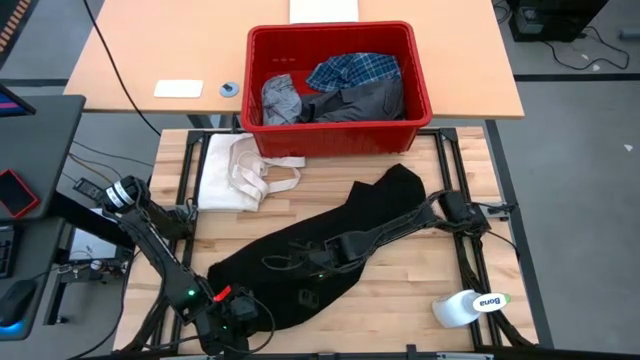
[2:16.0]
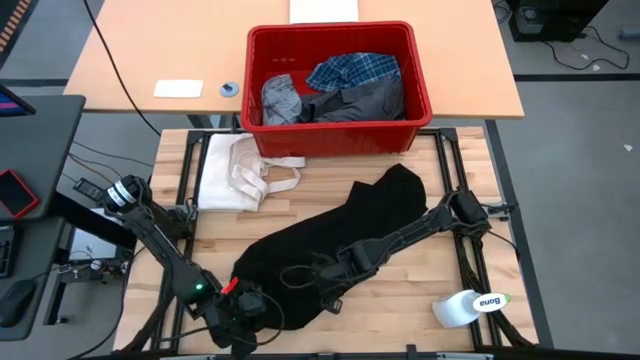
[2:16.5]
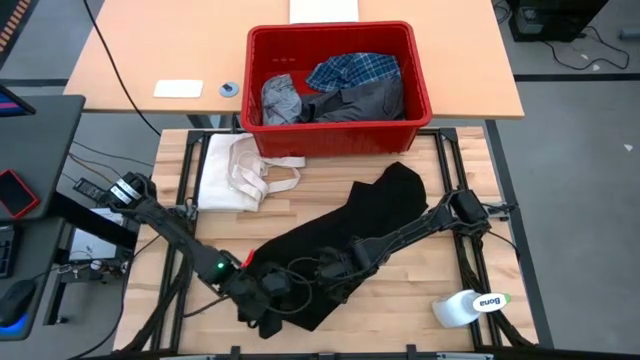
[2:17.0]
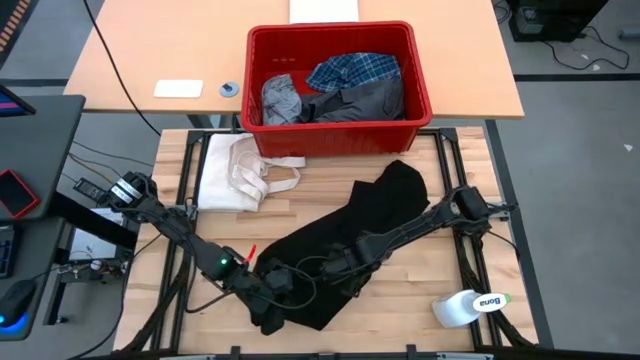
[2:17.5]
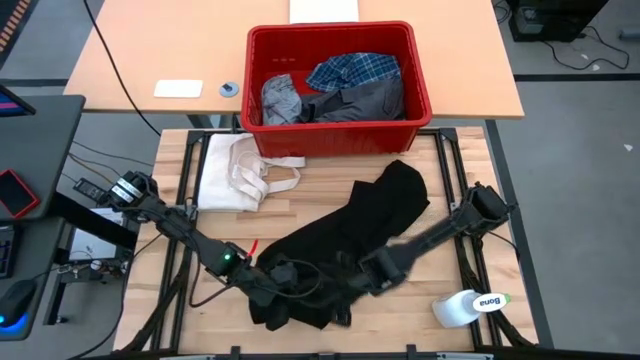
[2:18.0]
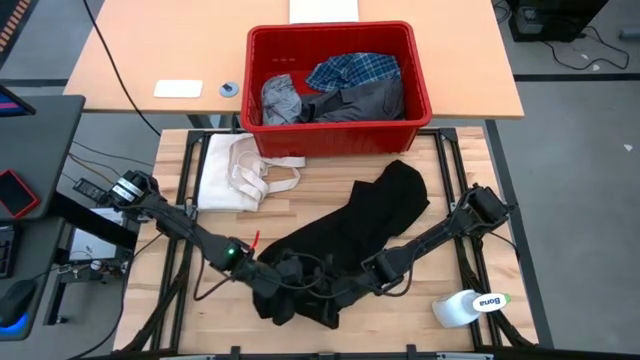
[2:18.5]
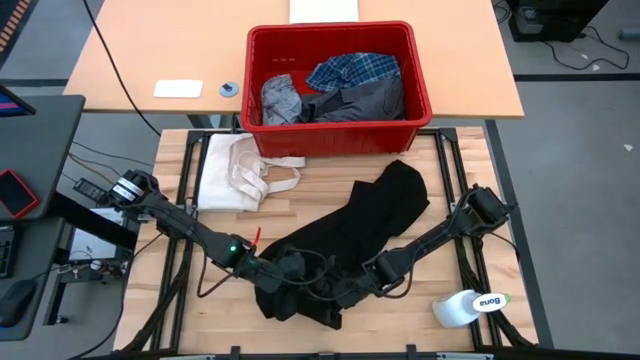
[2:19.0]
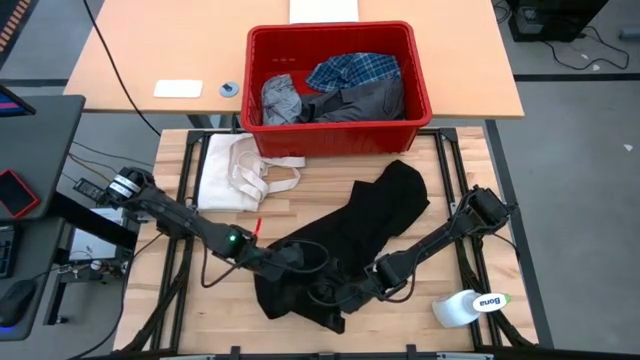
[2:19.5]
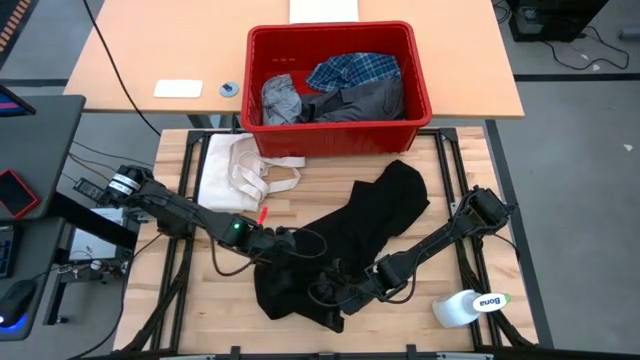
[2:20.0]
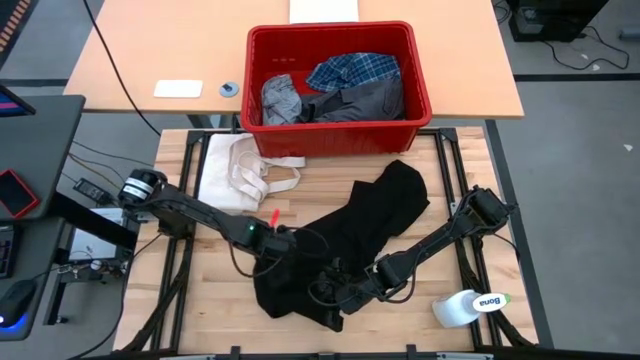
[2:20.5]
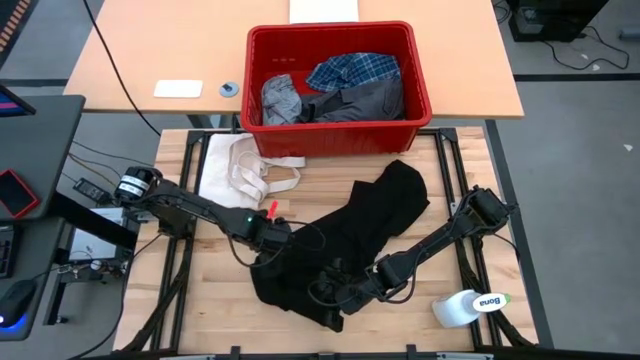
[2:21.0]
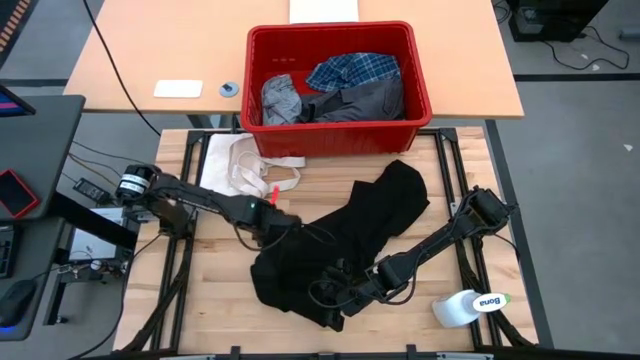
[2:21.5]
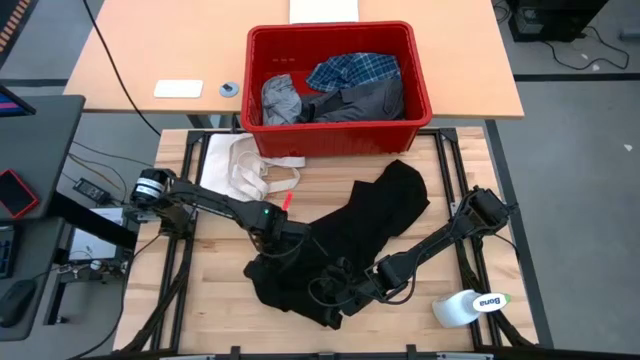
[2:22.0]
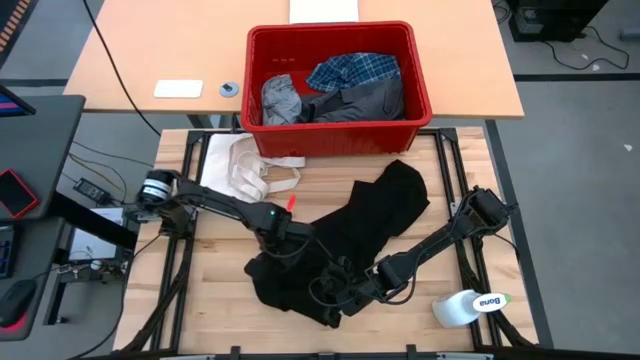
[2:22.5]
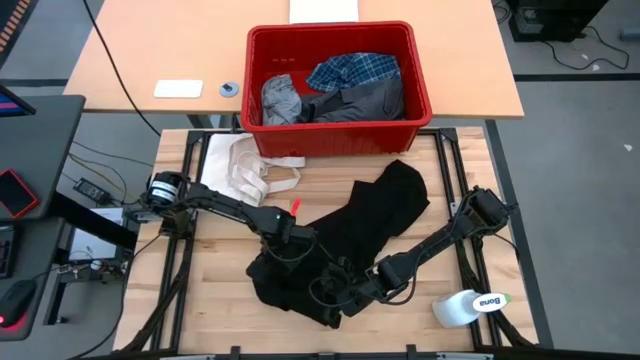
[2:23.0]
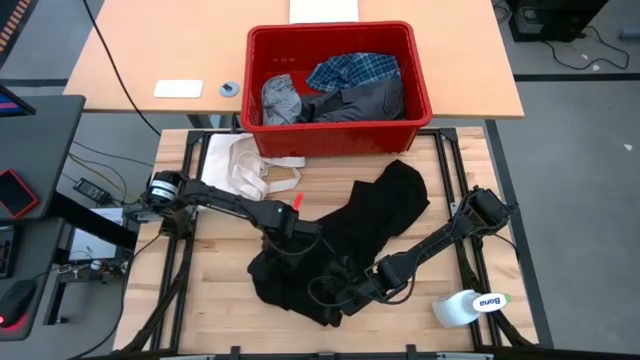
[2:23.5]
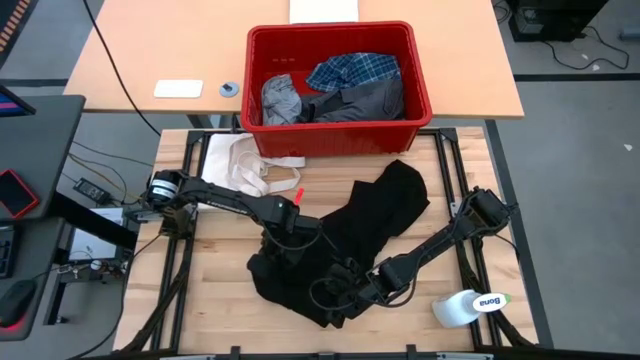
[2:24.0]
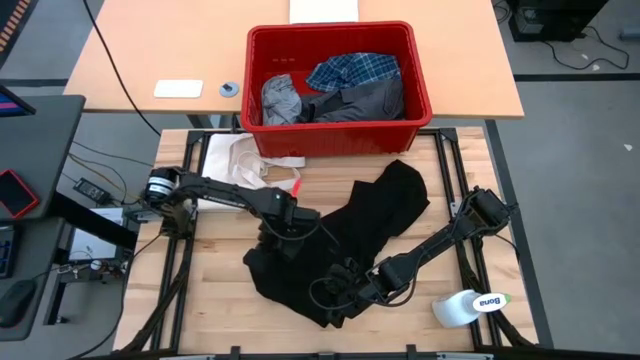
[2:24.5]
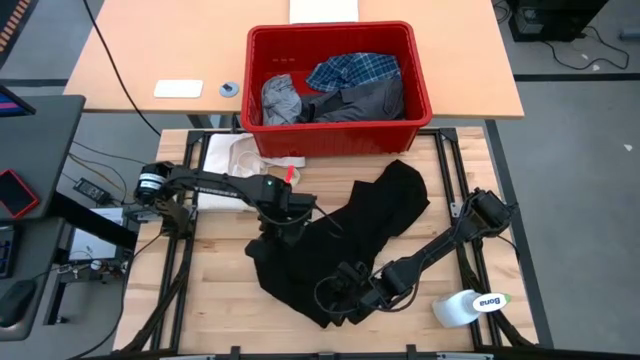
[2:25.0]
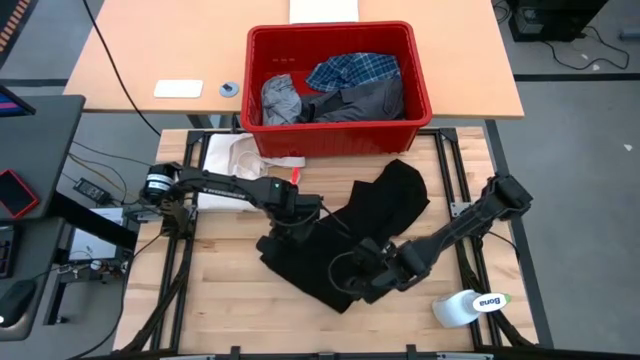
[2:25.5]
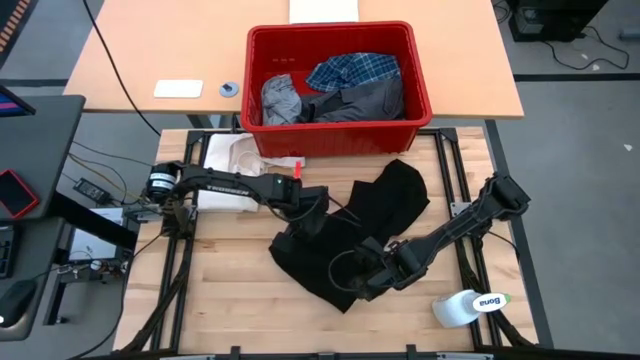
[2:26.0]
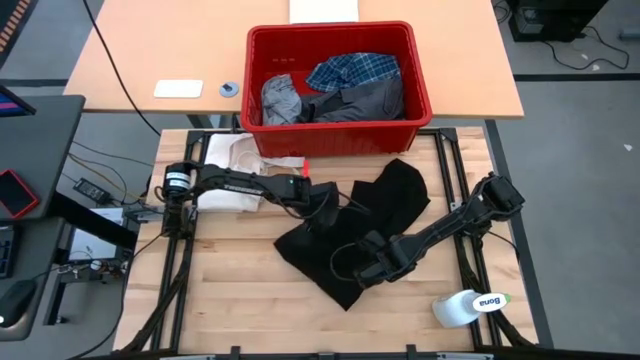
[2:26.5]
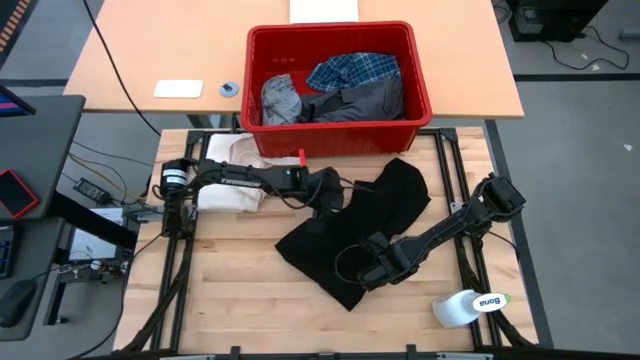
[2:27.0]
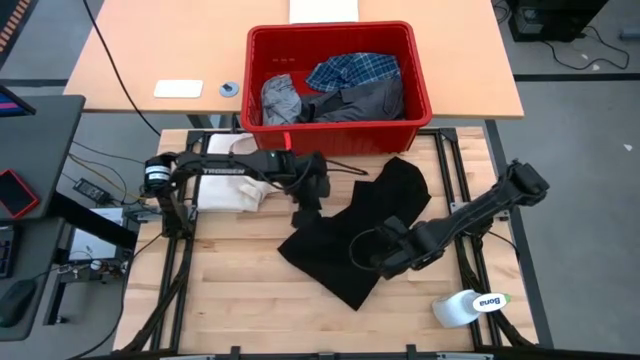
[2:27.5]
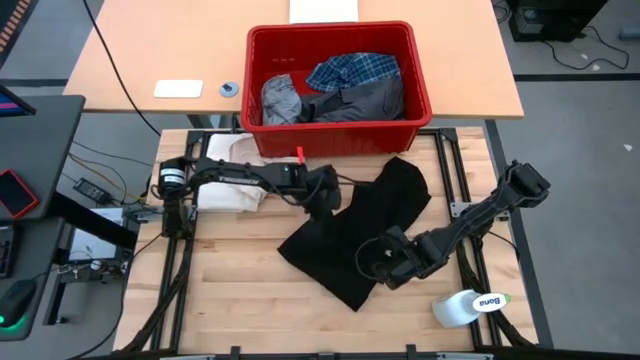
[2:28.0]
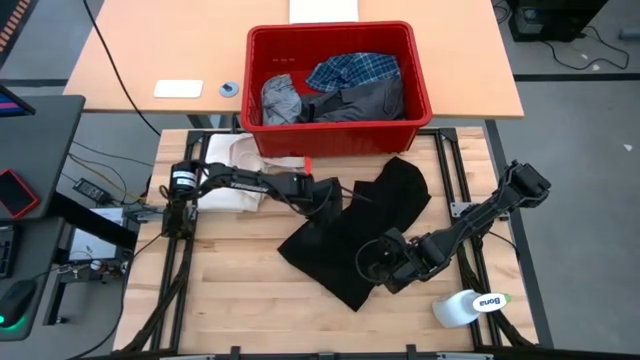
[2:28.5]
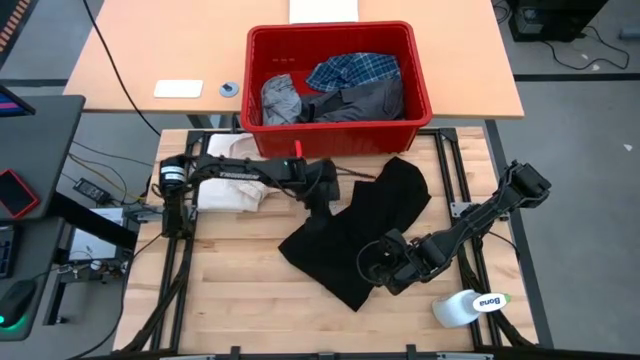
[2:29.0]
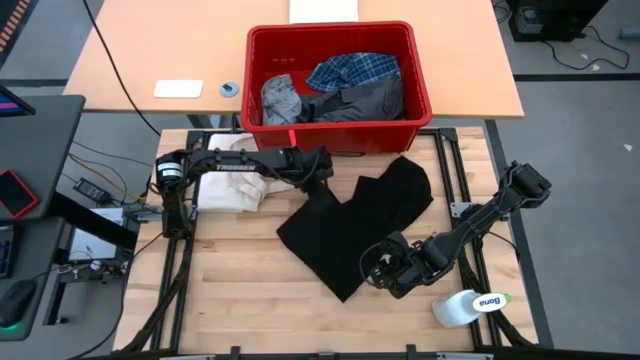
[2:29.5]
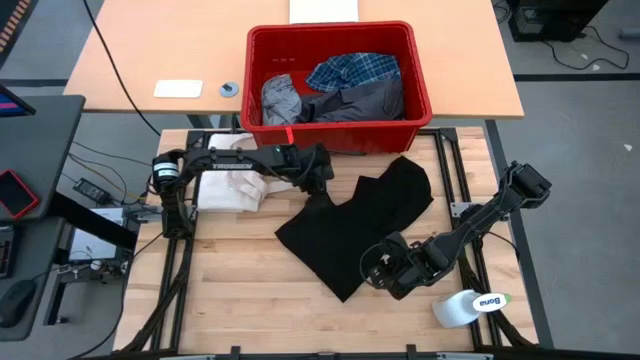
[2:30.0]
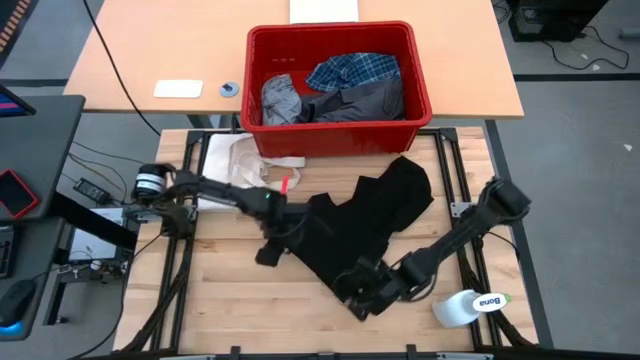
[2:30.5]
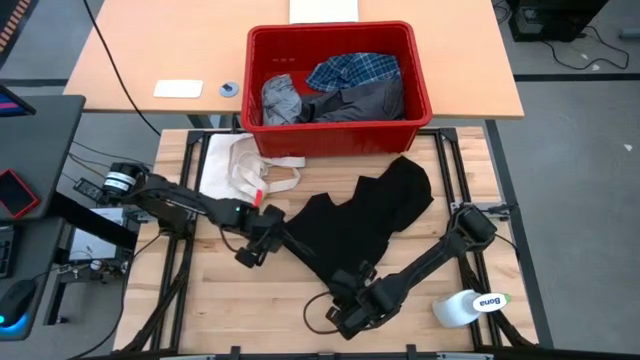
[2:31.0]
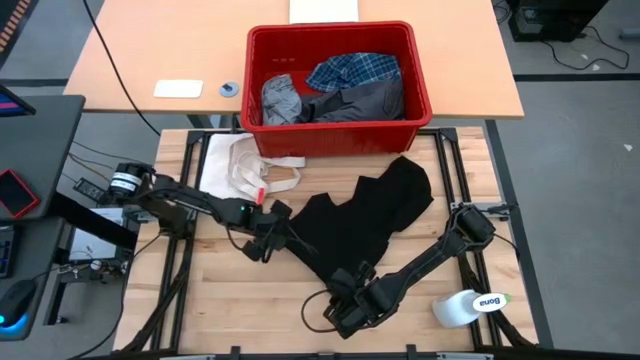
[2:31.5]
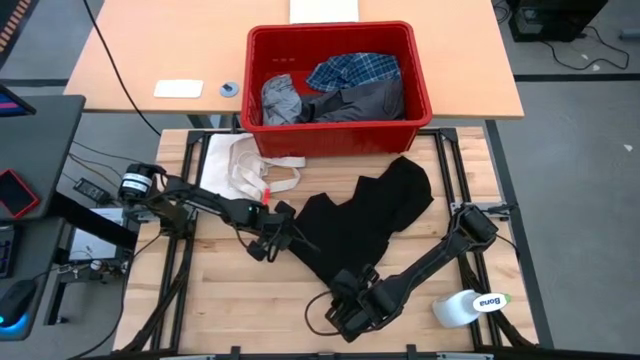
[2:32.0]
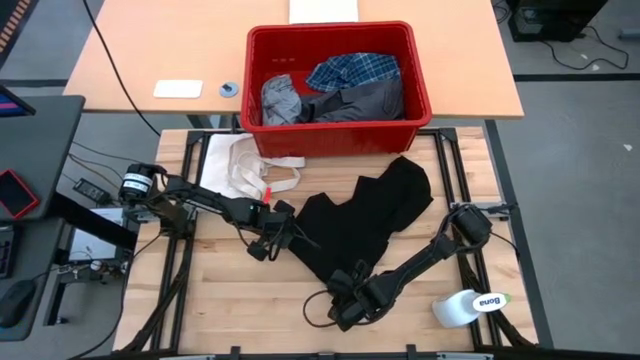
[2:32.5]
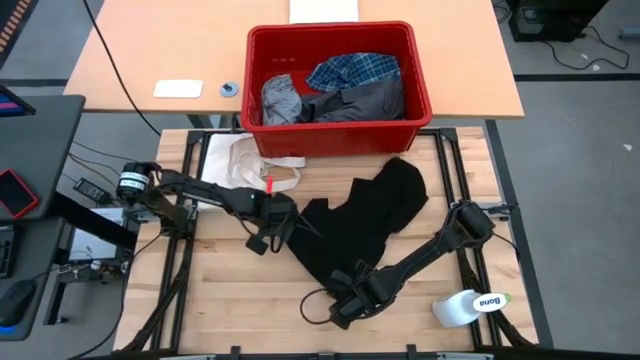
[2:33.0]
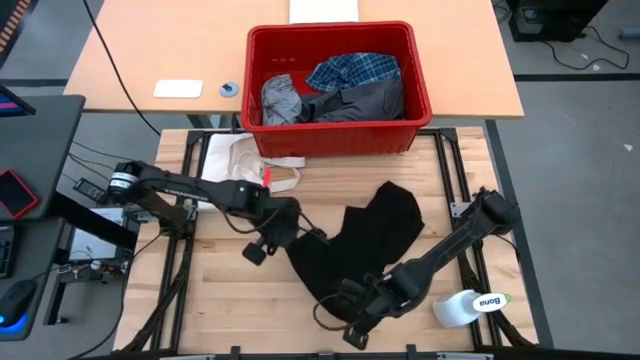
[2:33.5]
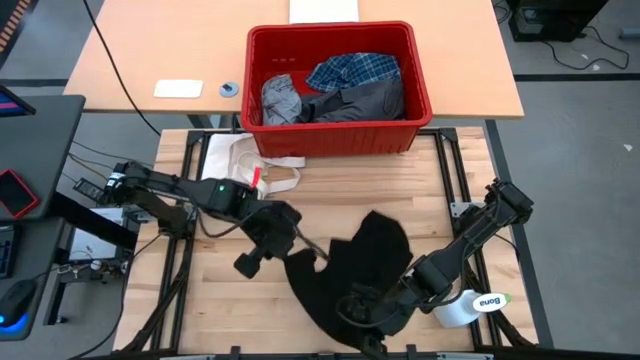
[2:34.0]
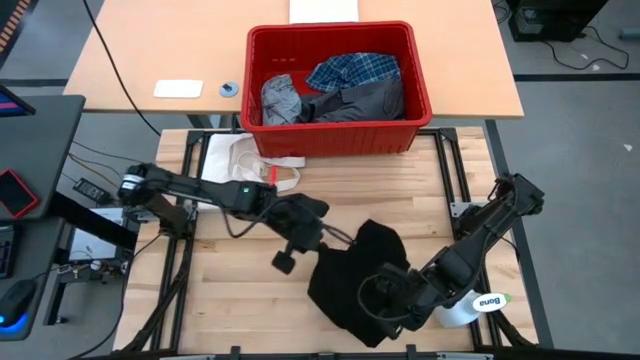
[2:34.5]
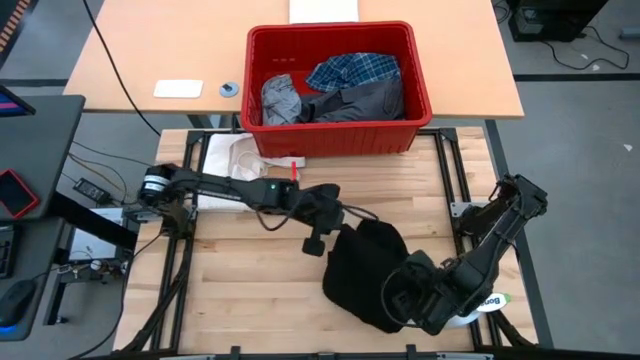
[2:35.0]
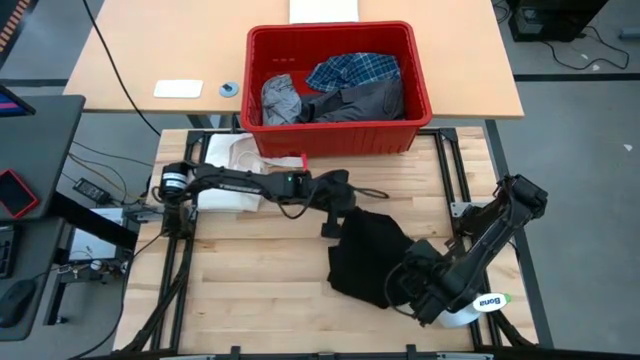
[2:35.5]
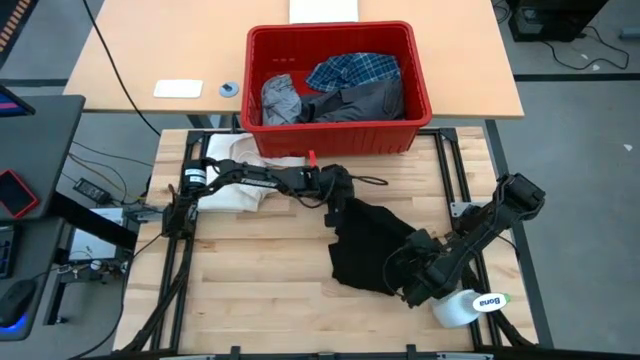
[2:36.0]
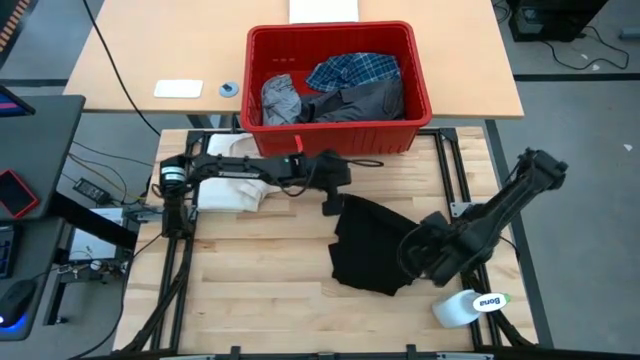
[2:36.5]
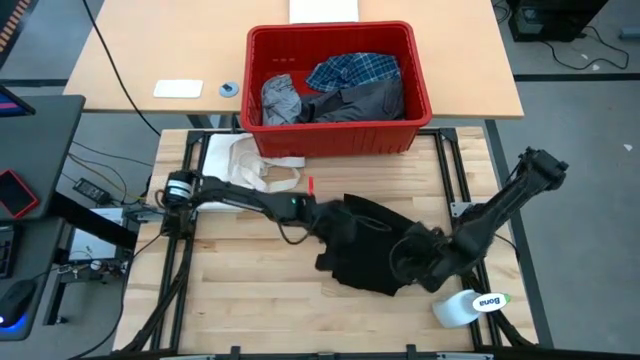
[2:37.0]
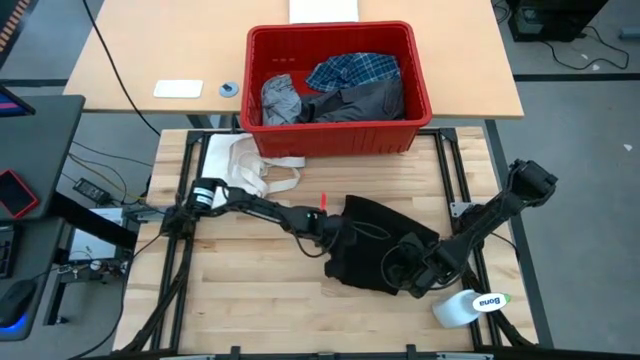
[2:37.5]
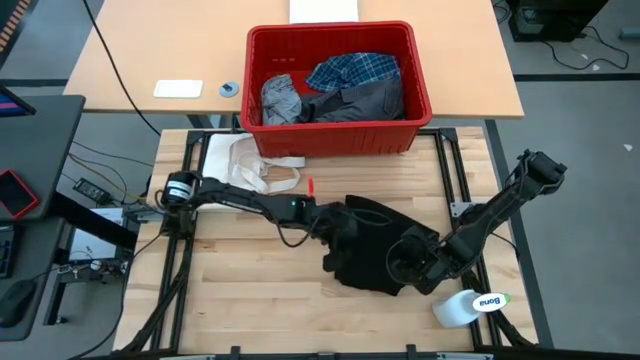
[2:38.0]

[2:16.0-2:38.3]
Task: Fold Laundry from Bin
Fold the black shirt
